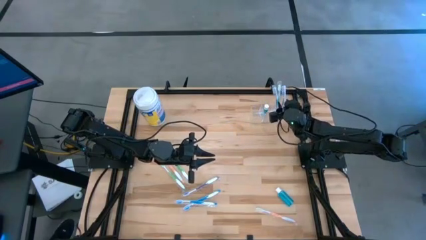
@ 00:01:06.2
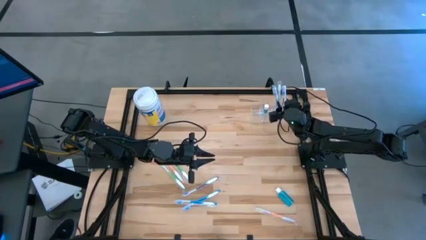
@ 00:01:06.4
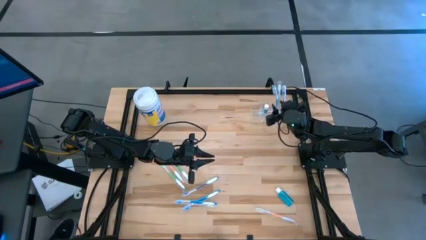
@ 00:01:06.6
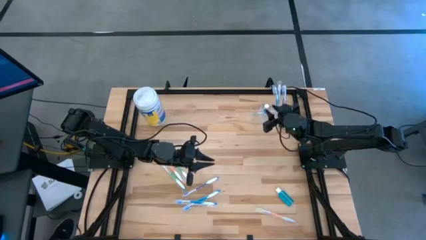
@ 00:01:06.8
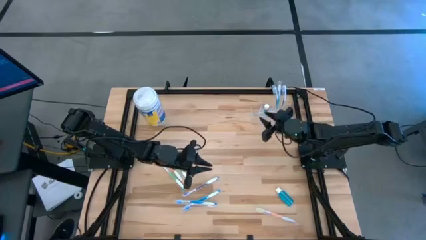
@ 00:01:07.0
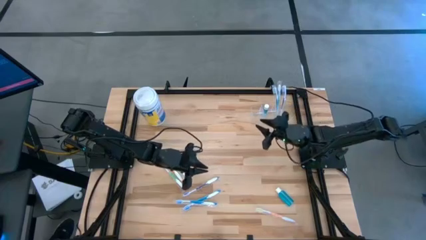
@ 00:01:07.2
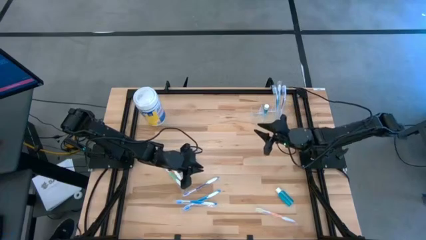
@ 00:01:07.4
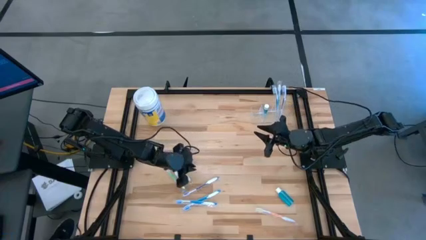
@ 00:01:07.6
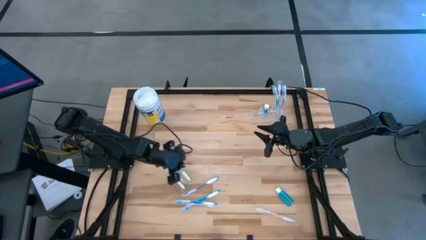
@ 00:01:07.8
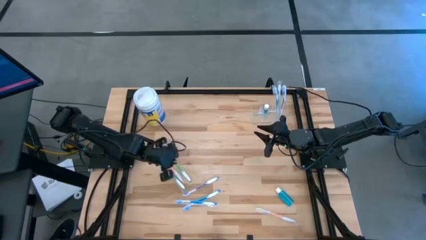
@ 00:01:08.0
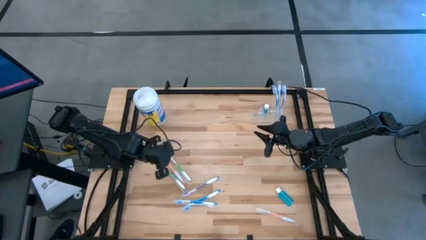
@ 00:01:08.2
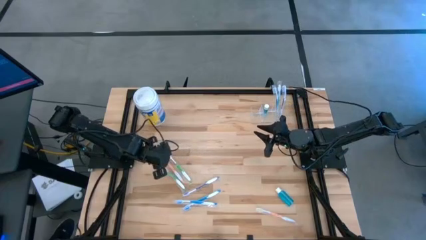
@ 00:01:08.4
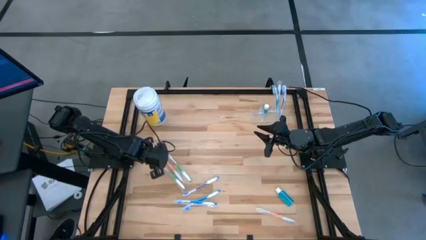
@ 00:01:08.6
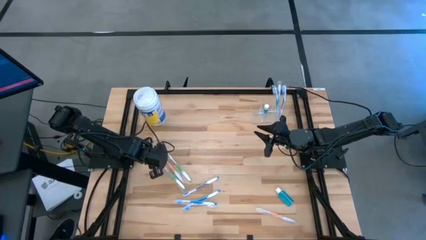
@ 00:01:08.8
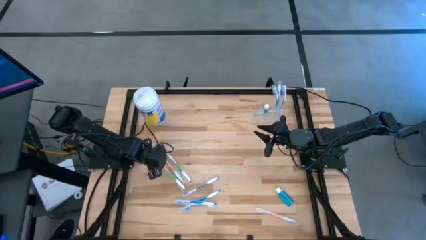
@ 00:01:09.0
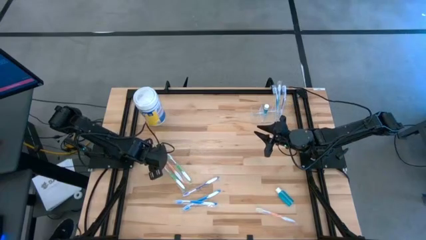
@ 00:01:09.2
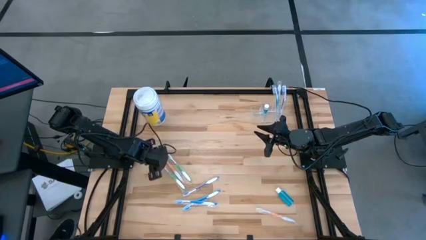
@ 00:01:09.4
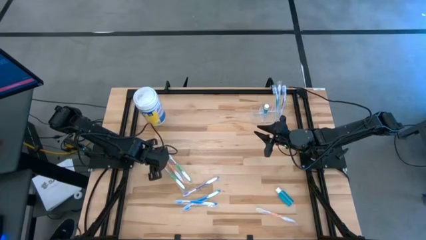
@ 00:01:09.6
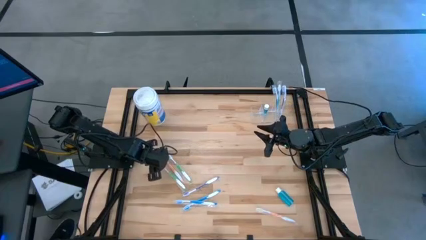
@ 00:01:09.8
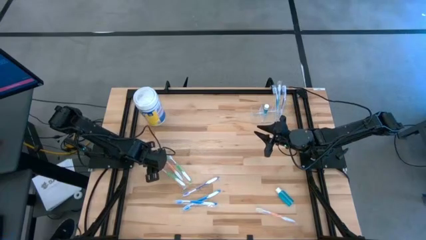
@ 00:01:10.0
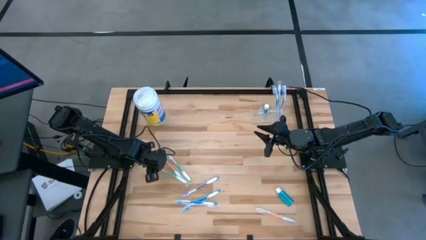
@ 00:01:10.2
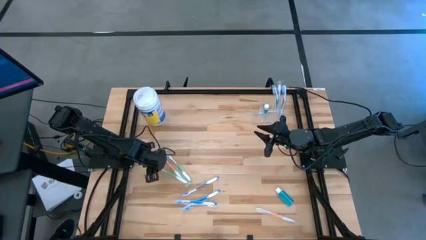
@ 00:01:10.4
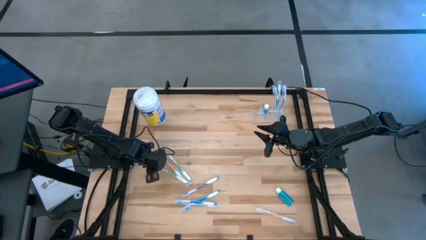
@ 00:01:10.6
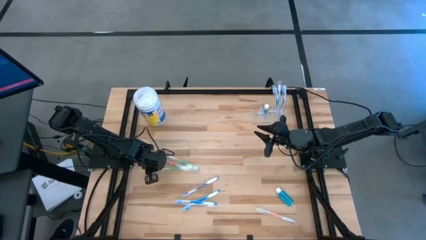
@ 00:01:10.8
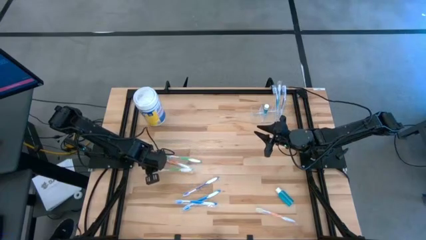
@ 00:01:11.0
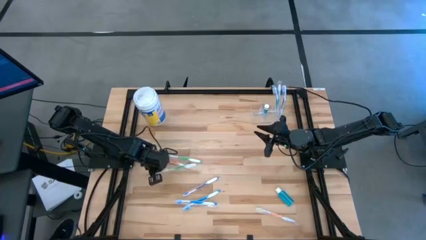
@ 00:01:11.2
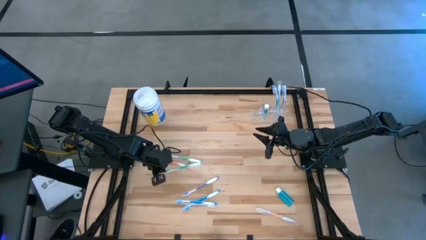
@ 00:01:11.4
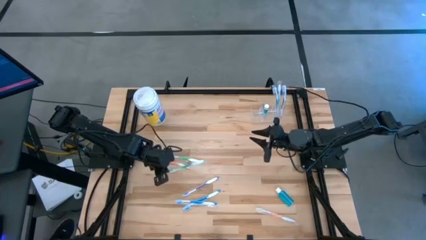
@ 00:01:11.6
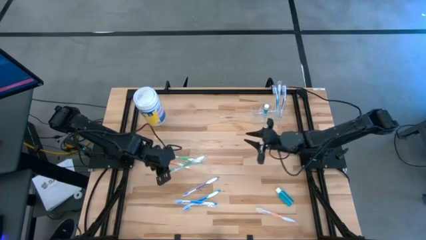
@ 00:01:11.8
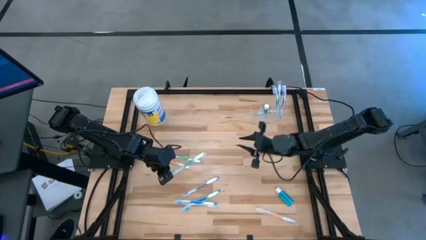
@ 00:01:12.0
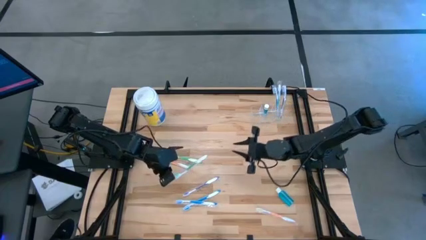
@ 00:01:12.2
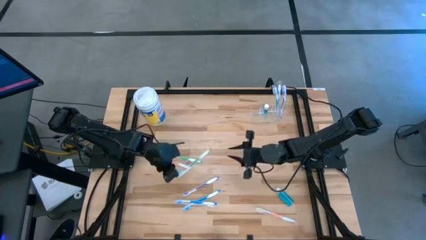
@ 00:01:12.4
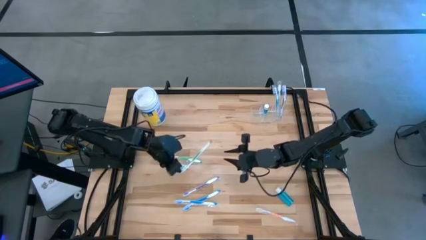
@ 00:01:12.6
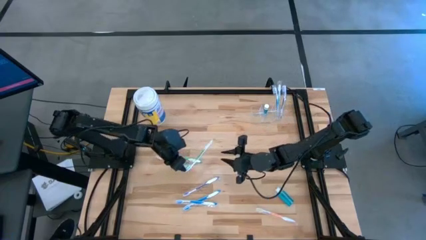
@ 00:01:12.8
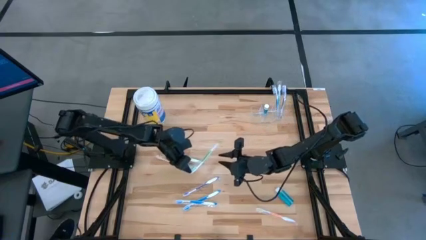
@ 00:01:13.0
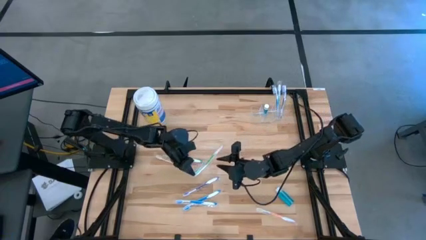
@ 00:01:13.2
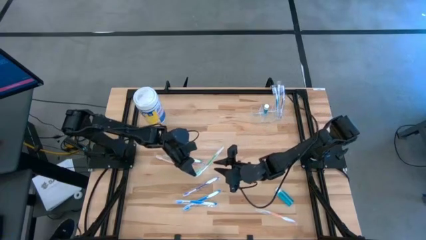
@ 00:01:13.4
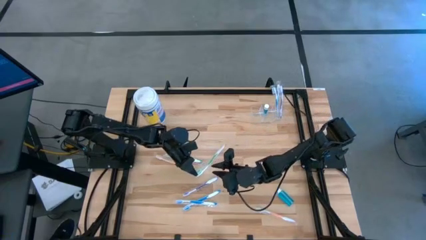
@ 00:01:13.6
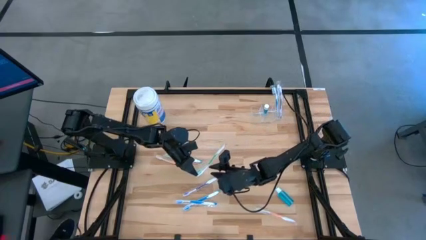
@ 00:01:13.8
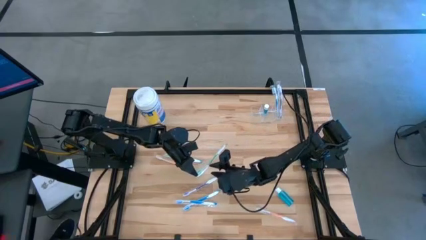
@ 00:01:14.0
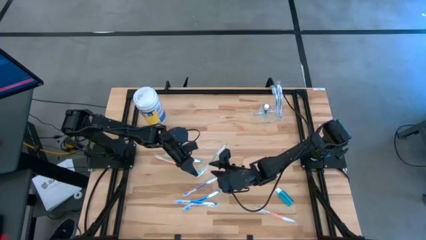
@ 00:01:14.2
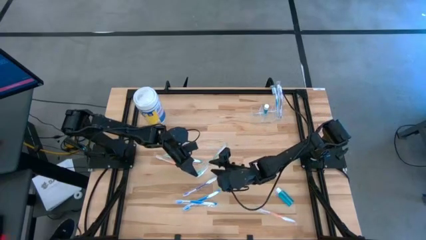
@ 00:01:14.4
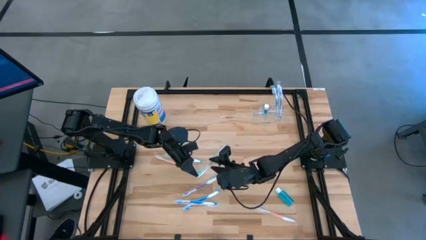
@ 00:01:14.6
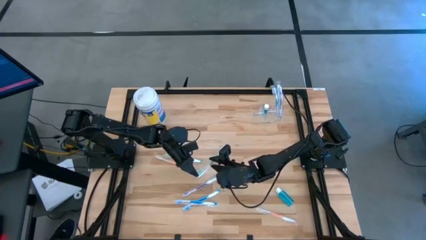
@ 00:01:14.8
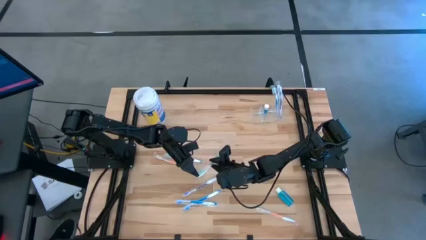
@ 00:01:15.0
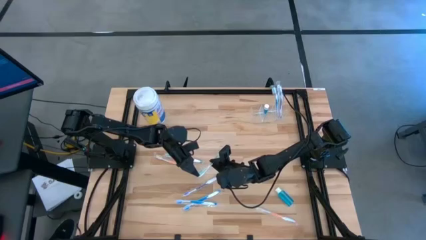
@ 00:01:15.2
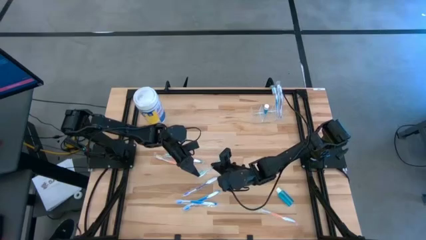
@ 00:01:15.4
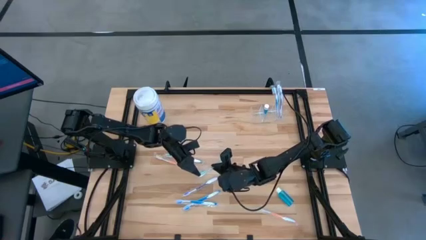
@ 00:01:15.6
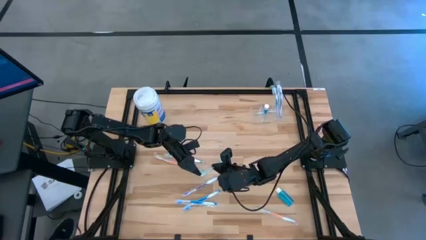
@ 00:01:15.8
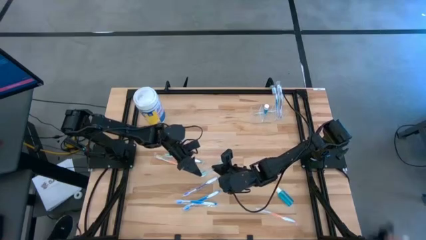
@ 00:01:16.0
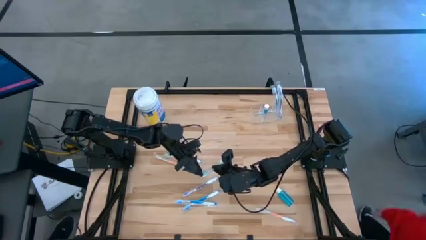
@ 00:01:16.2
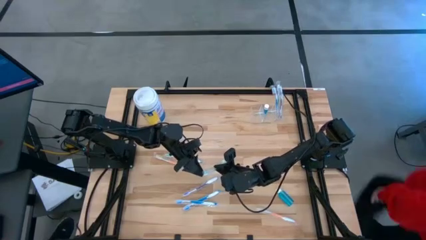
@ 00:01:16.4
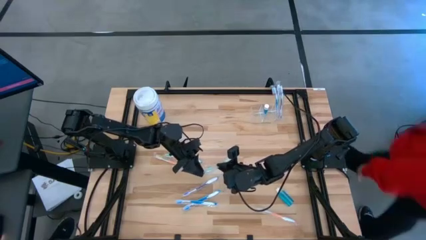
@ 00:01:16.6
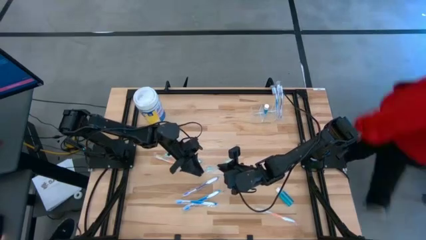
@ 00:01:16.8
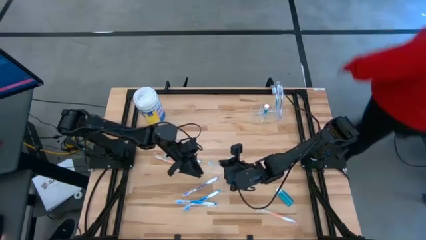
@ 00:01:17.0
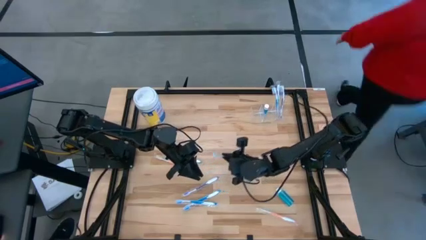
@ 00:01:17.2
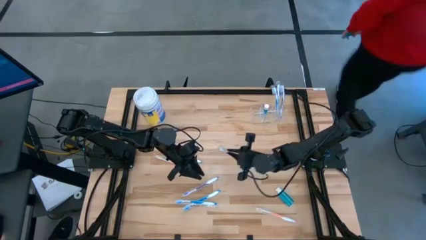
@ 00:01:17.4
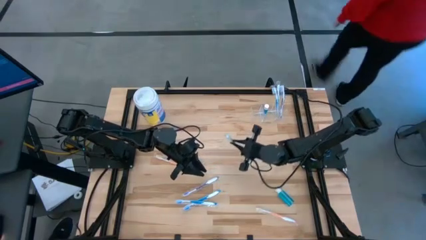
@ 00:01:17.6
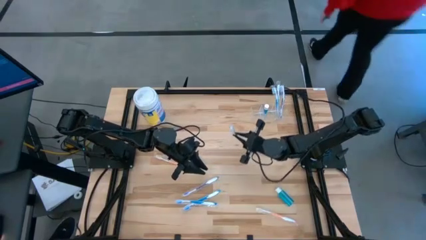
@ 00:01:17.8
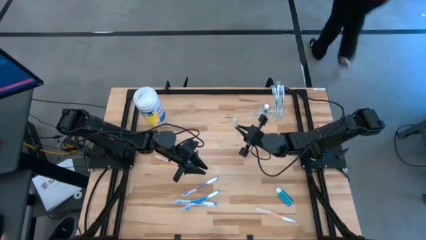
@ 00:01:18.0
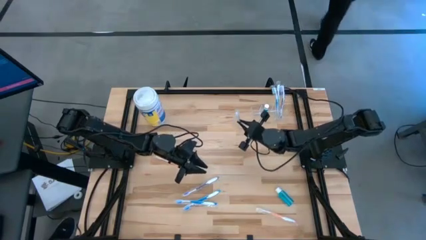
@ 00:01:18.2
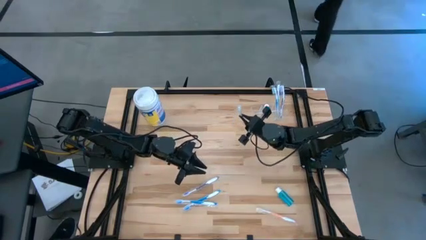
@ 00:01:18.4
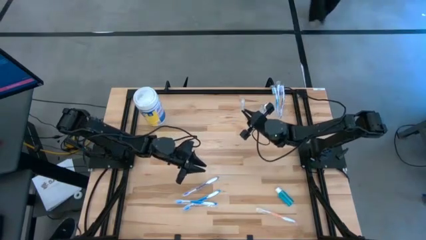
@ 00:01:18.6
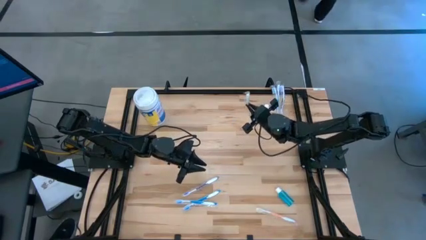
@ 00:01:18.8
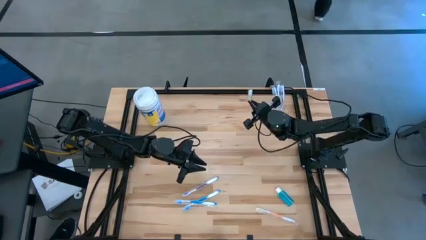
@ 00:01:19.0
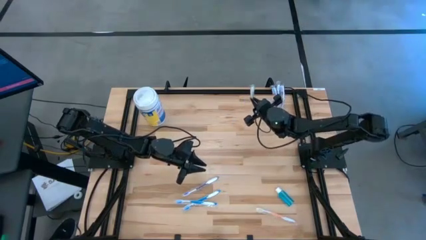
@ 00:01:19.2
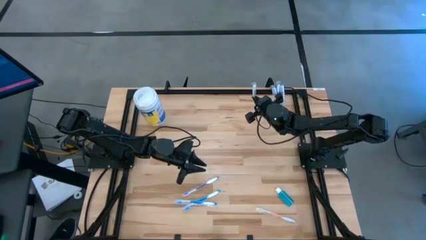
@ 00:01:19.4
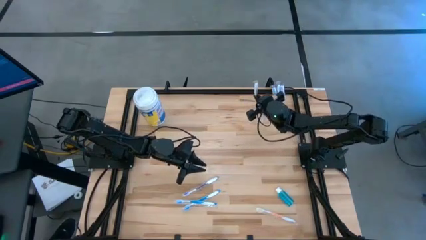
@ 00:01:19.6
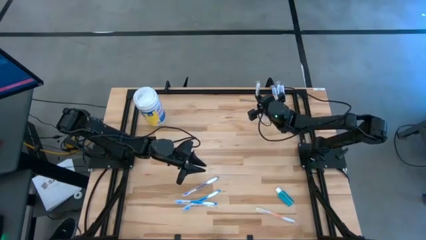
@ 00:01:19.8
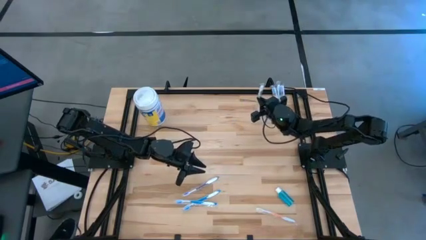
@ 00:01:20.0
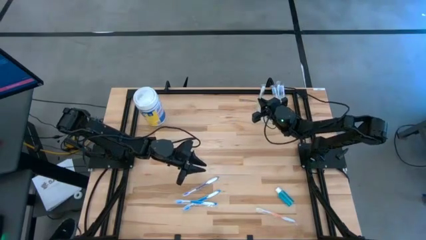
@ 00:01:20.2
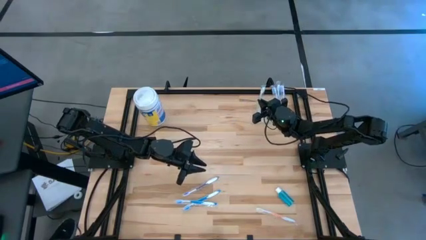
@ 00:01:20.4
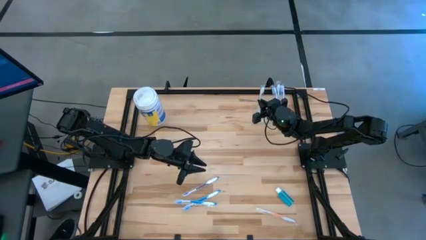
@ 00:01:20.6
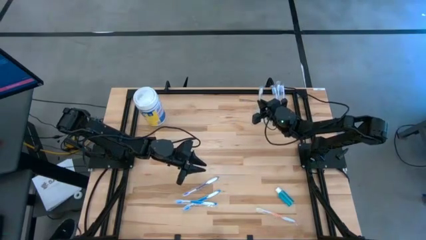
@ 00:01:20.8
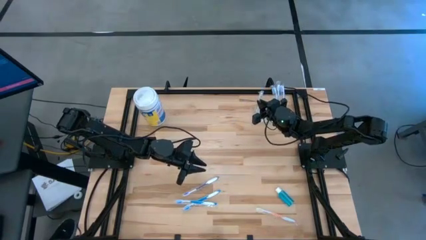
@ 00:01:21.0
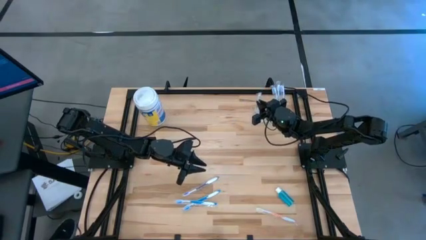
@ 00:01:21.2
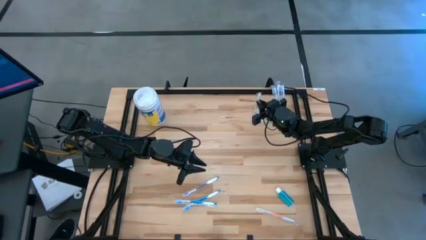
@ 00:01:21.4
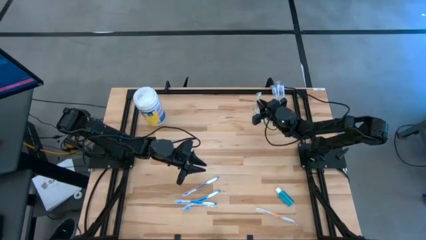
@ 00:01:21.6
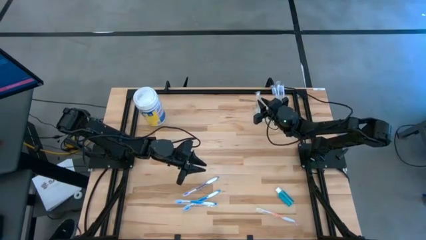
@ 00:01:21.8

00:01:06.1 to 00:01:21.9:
Task: Pick & Place toothbrushing station
Put the bottom green toothbrush into the left transparent organizer
